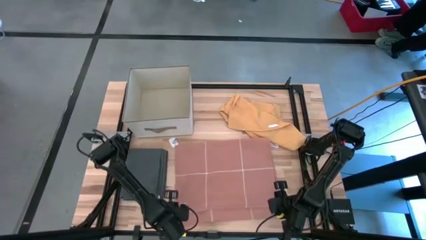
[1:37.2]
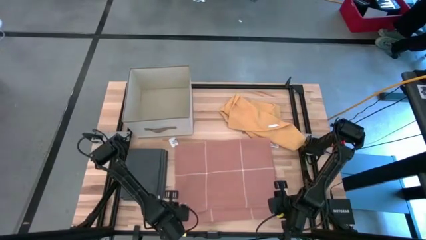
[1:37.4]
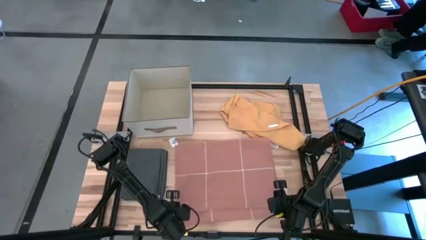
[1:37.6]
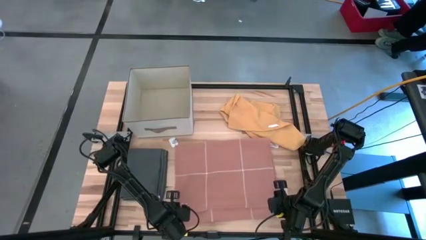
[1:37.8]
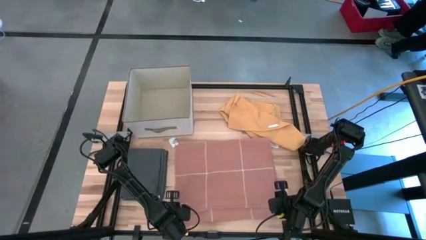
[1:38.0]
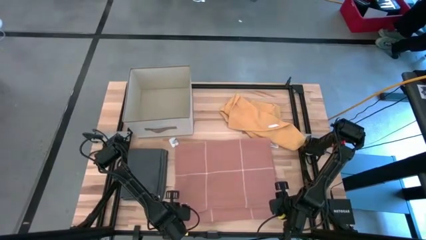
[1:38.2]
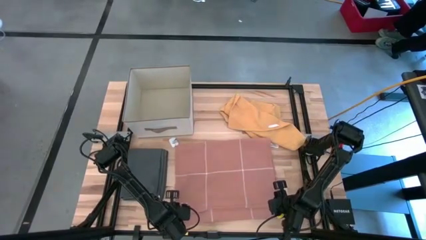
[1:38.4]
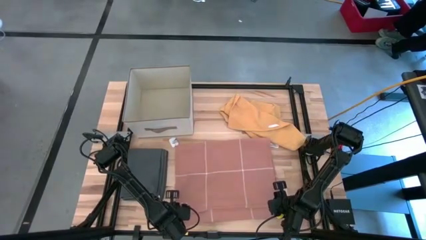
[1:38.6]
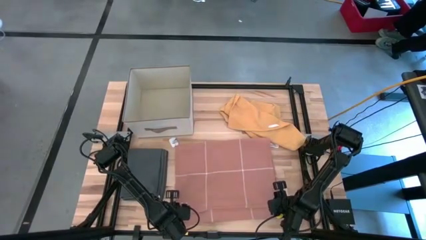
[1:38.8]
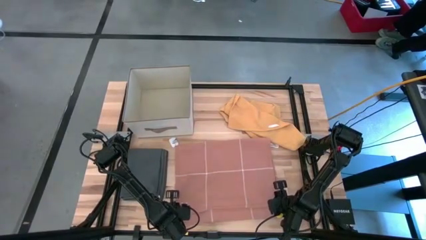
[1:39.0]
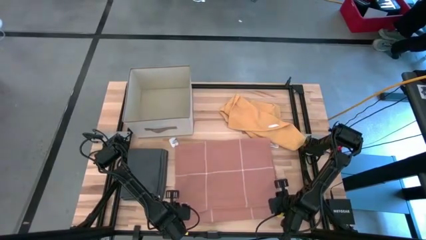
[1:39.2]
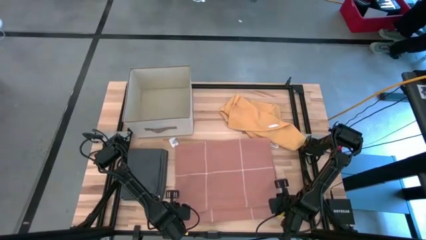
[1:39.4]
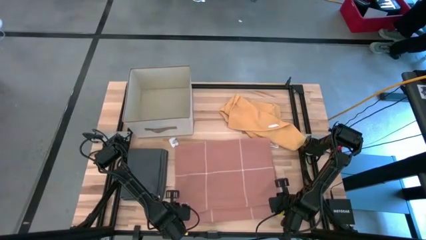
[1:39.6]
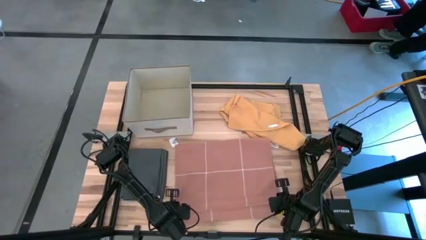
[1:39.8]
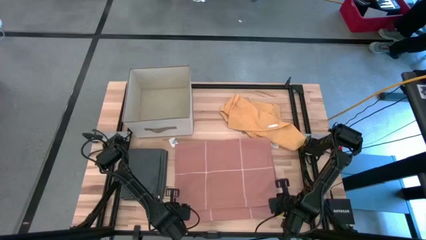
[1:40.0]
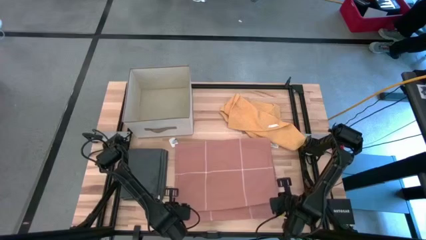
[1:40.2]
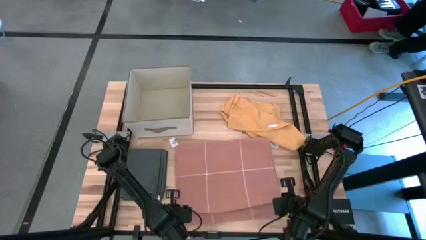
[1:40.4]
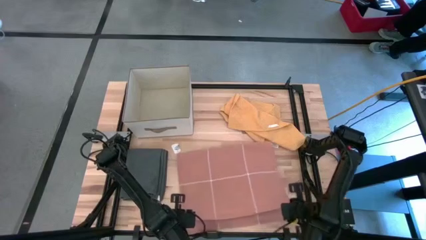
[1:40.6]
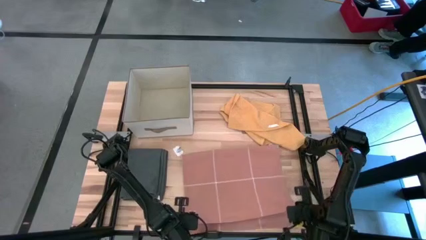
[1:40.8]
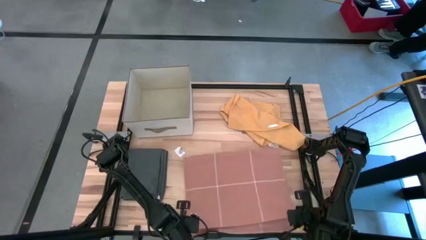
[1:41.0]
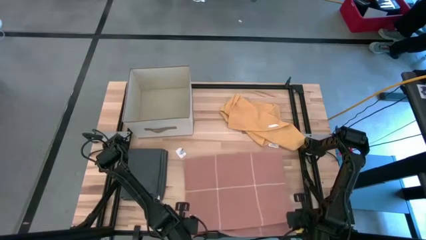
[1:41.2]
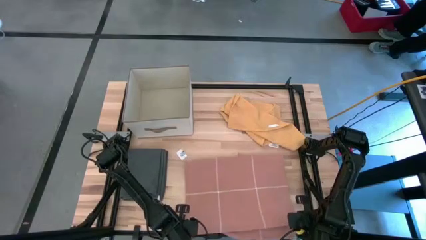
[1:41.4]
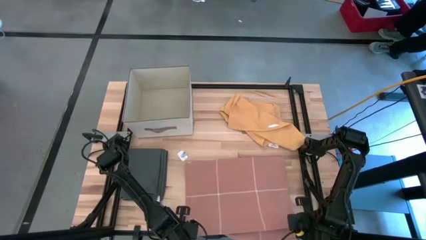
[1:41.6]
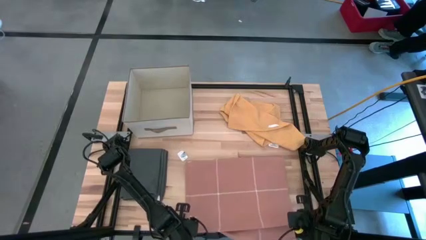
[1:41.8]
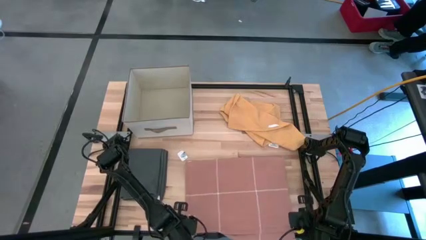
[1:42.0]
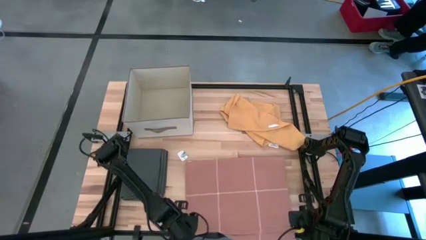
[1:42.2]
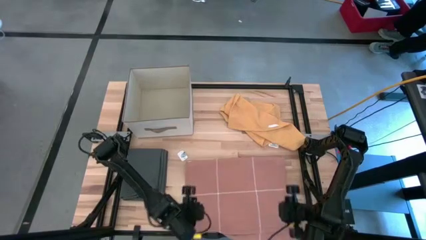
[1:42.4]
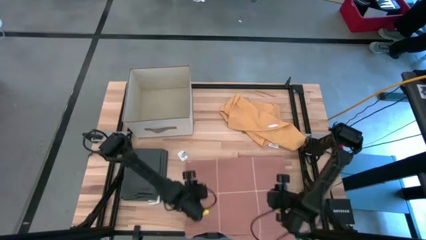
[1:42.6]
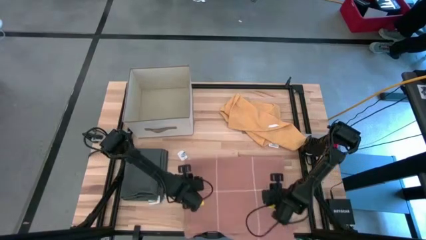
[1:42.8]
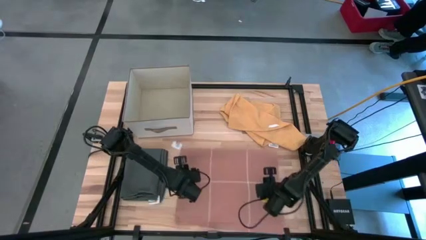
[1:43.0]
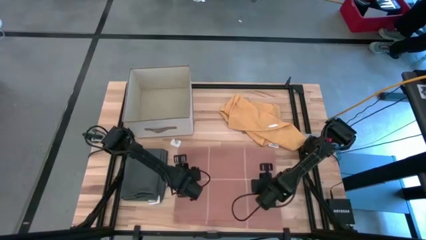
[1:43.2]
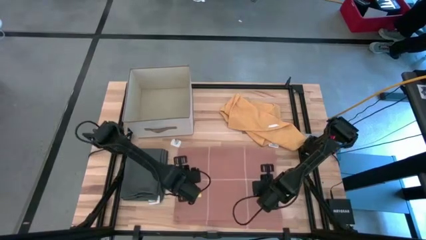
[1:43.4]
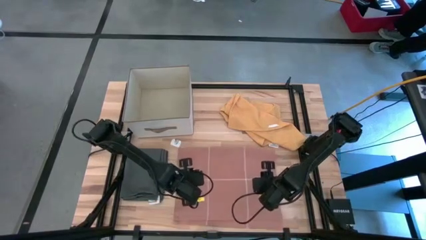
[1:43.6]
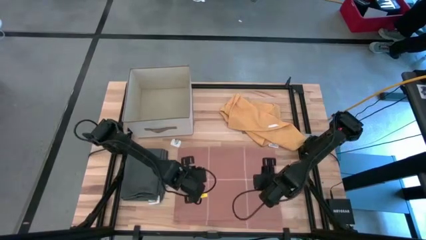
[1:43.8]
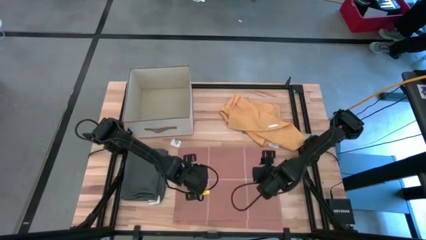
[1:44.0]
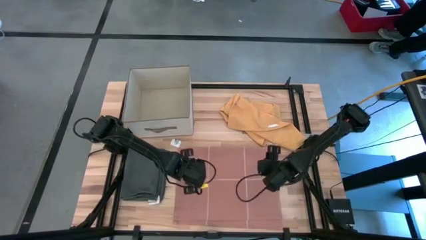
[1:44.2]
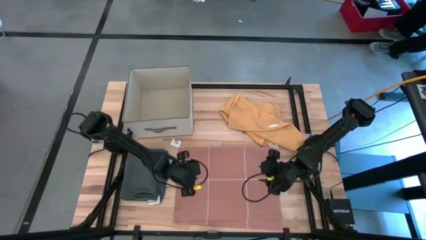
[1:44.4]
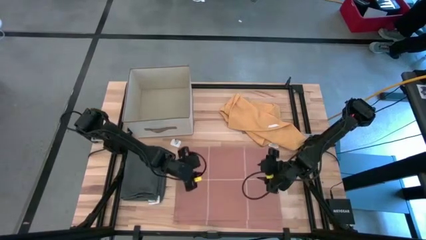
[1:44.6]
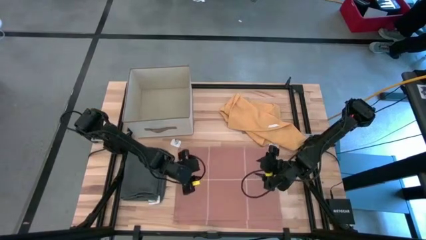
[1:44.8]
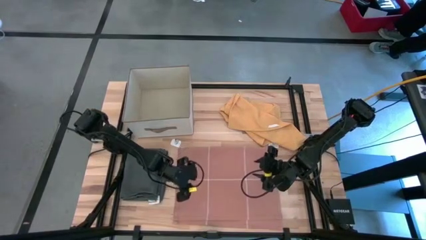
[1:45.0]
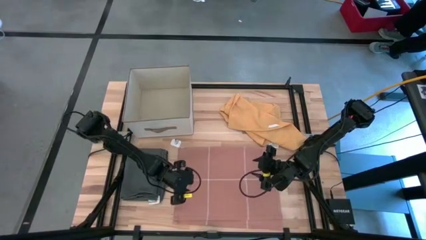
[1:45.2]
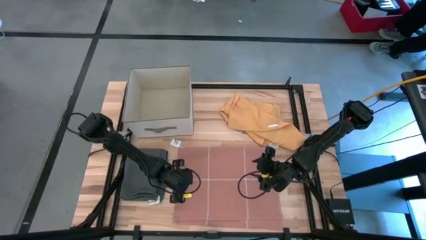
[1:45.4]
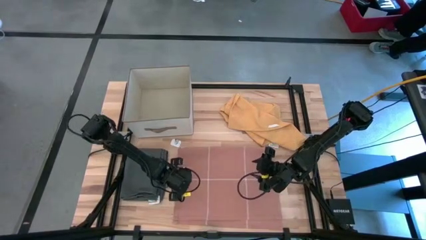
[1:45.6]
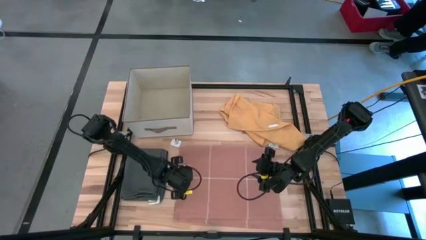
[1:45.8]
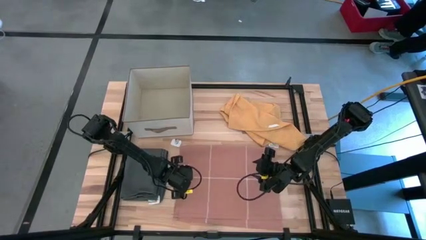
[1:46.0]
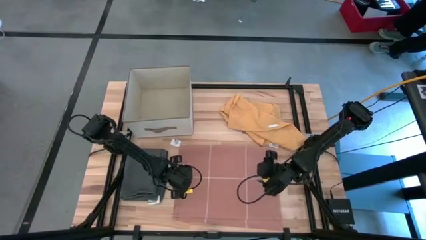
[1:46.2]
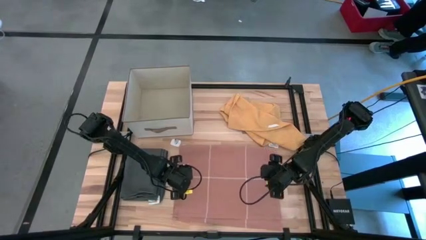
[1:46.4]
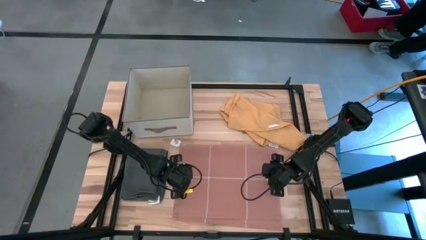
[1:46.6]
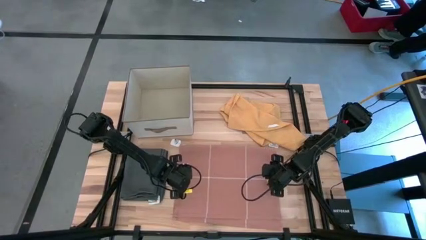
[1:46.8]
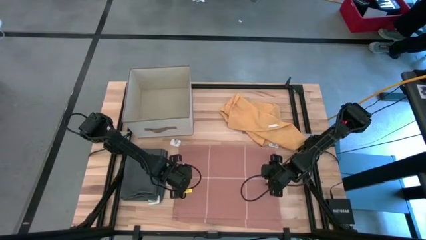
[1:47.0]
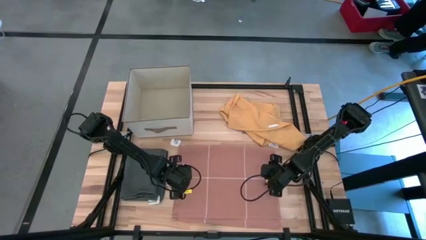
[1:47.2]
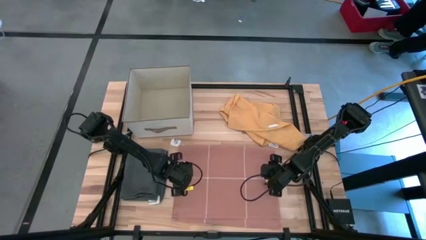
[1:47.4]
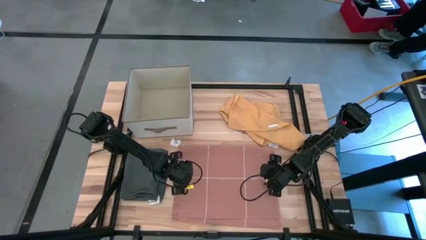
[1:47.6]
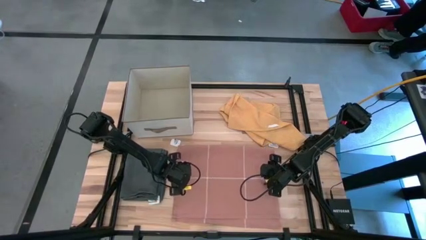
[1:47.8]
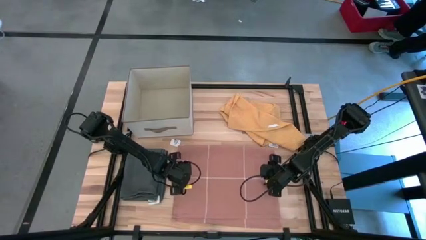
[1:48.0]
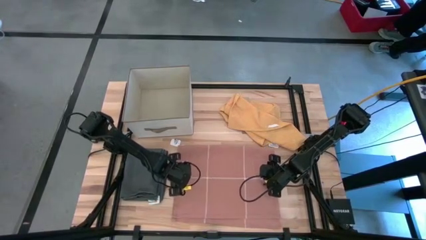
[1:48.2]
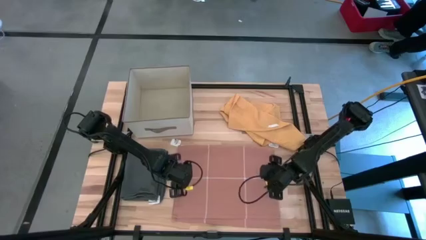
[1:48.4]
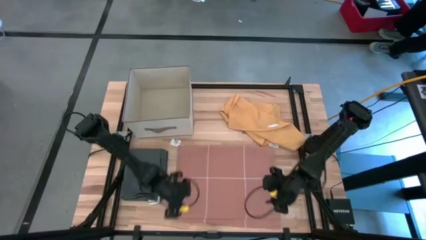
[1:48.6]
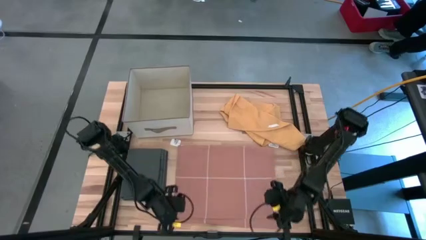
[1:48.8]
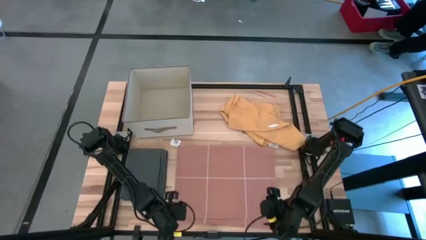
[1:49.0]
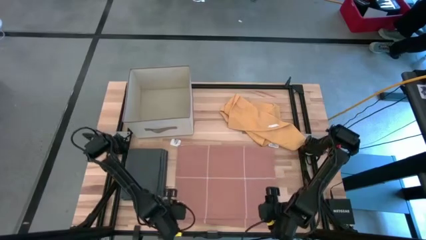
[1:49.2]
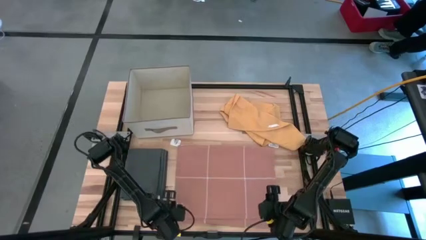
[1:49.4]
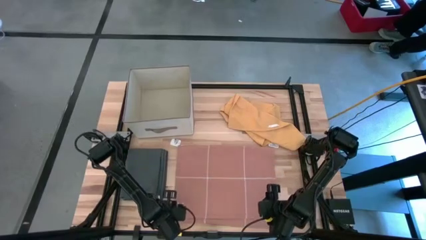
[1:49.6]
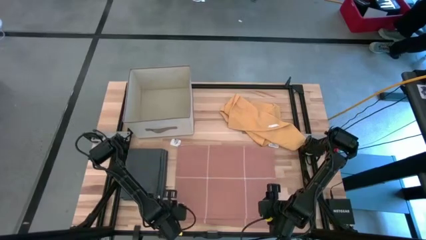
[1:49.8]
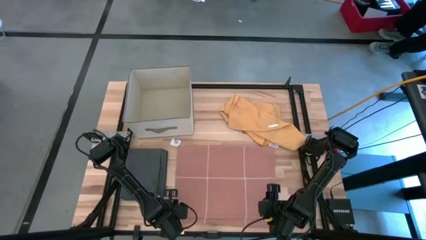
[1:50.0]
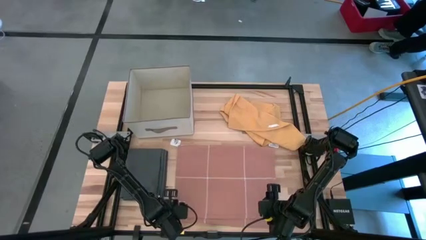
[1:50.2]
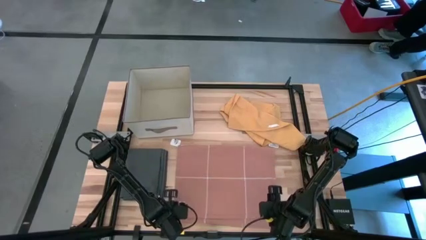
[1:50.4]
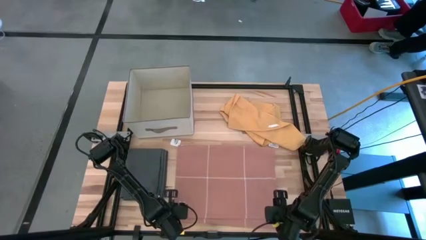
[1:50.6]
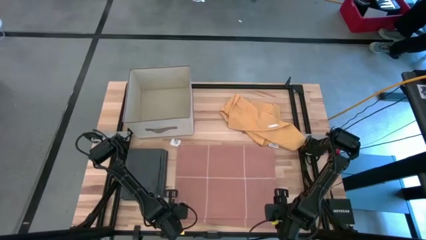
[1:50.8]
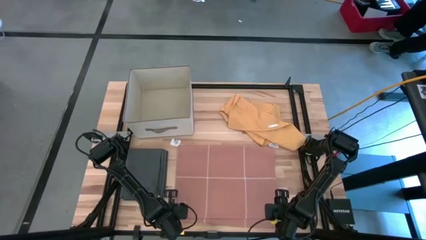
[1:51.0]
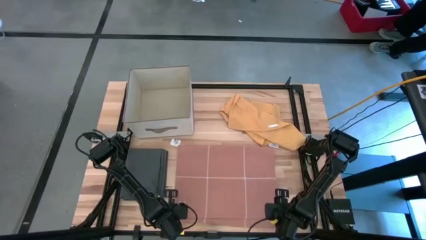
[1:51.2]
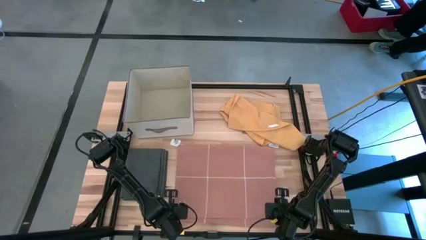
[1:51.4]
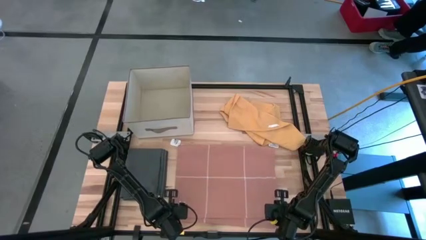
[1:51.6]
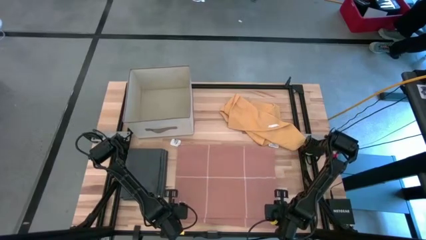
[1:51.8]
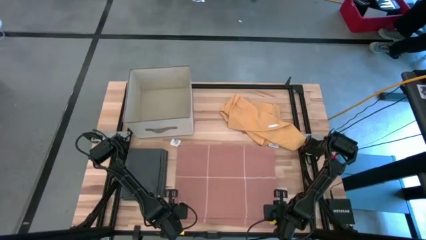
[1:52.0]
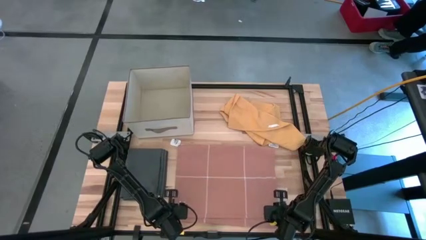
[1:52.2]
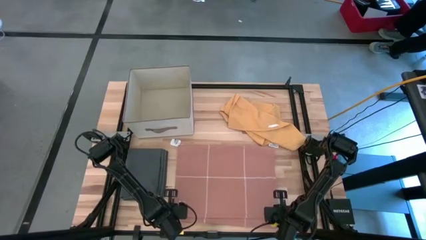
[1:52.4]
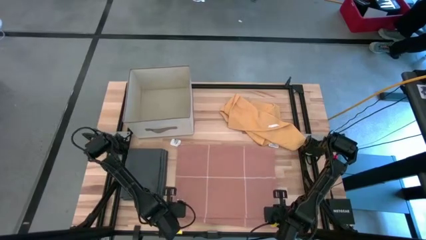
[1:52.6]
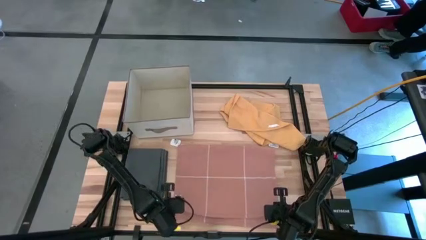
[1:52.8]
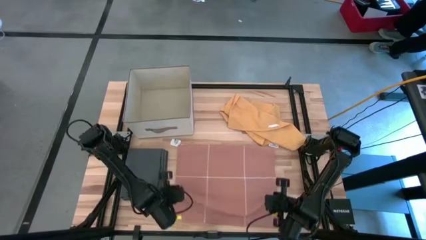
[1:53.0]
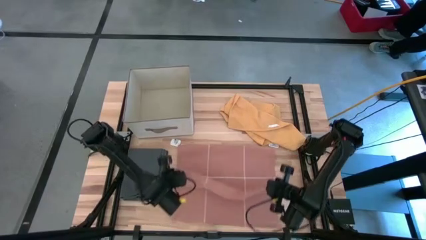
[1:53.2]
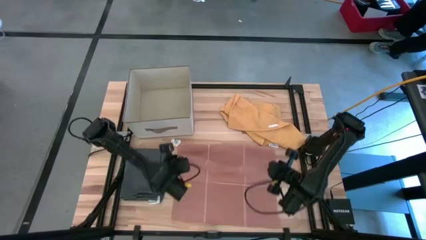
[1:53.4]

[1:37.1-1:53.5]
Task: Fold towel
Fold the light orange towel
